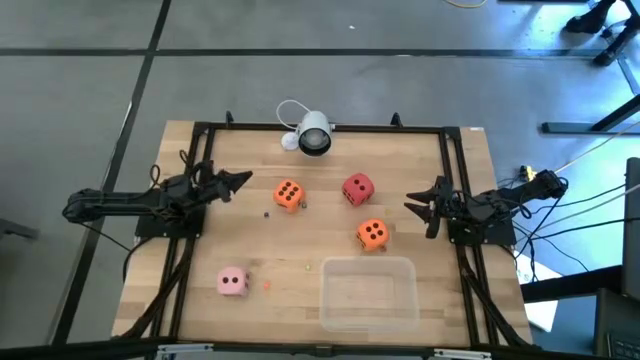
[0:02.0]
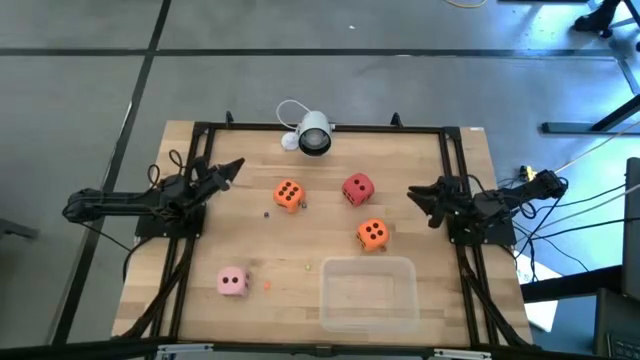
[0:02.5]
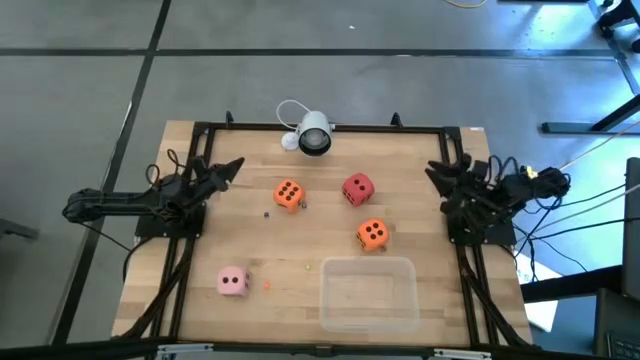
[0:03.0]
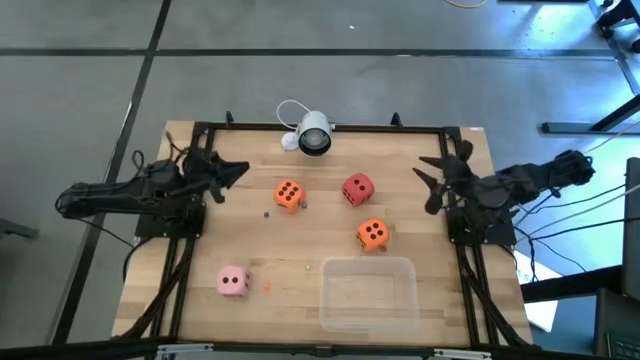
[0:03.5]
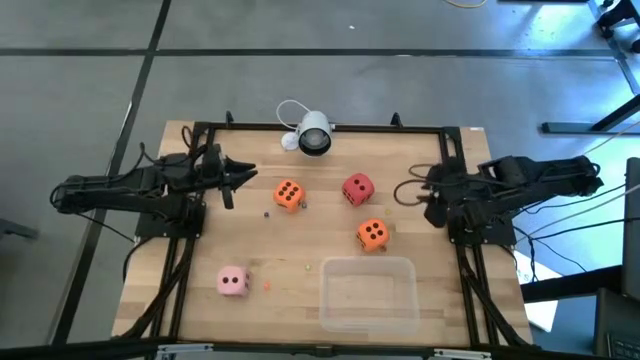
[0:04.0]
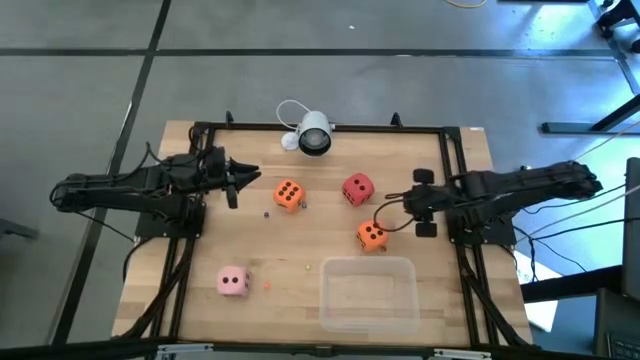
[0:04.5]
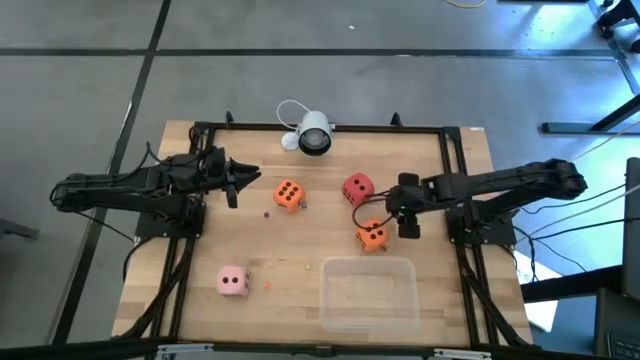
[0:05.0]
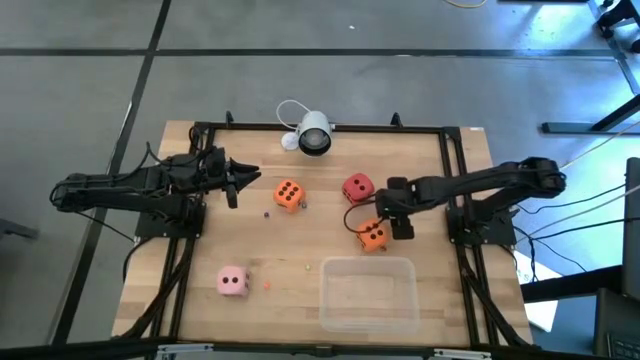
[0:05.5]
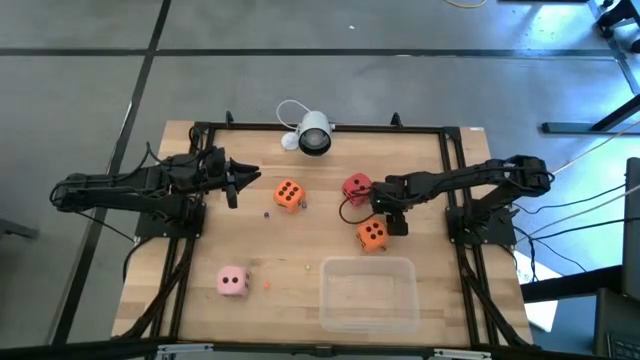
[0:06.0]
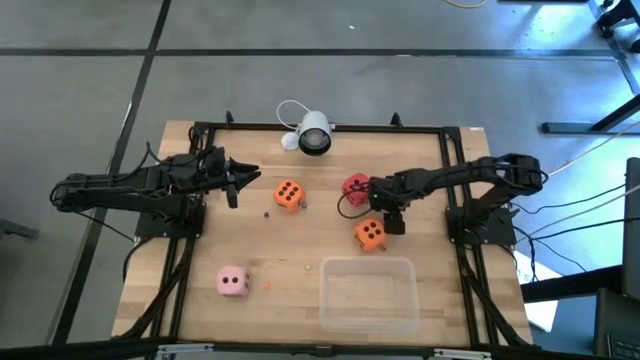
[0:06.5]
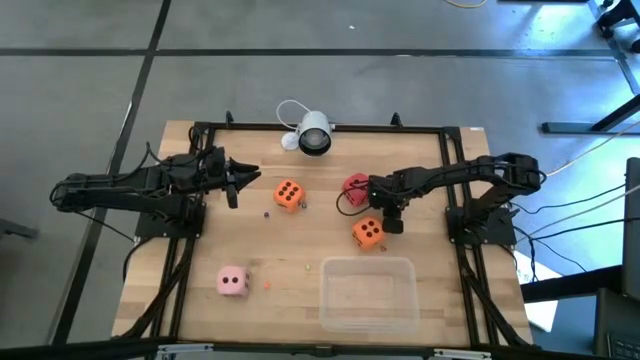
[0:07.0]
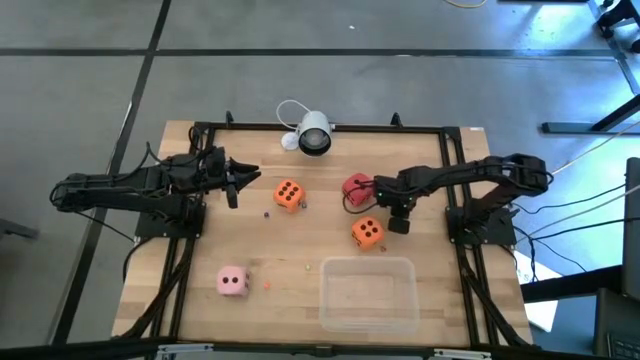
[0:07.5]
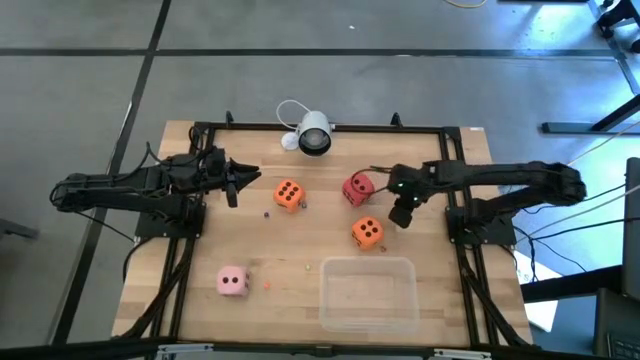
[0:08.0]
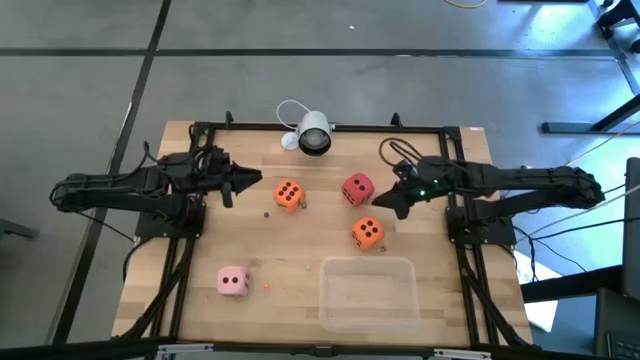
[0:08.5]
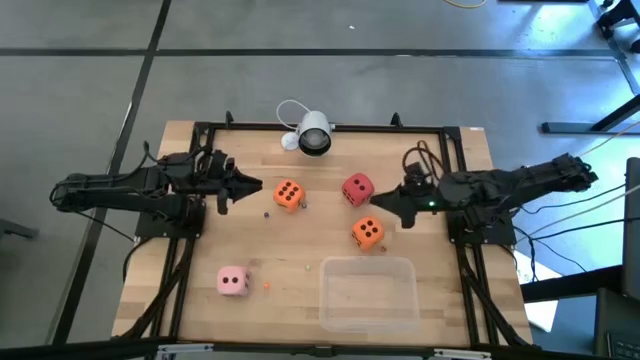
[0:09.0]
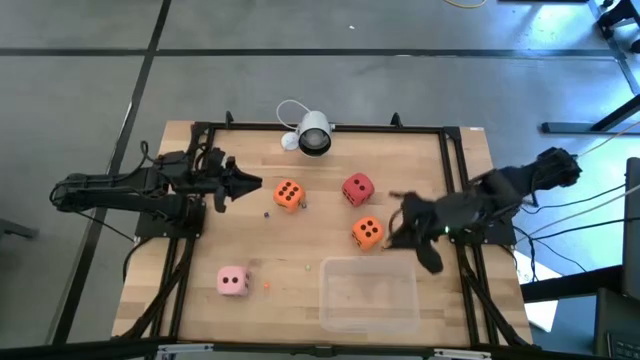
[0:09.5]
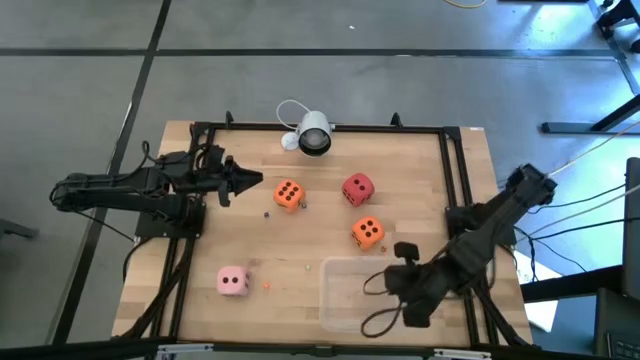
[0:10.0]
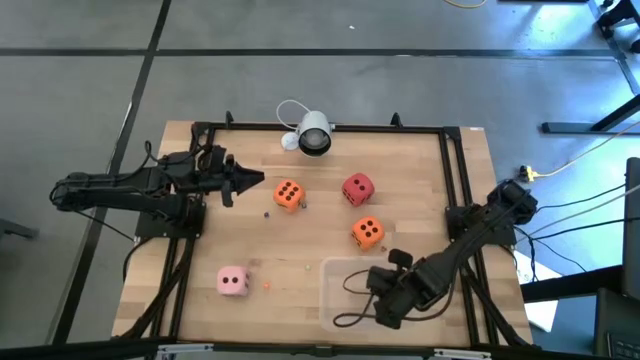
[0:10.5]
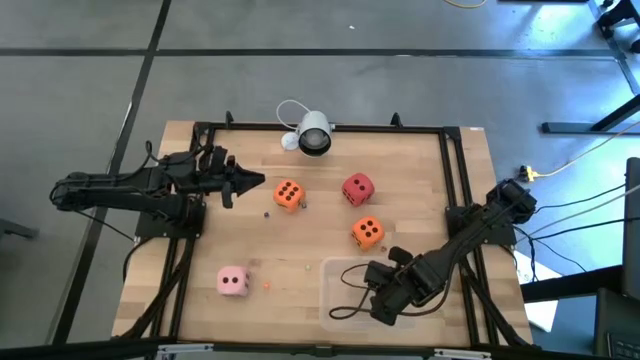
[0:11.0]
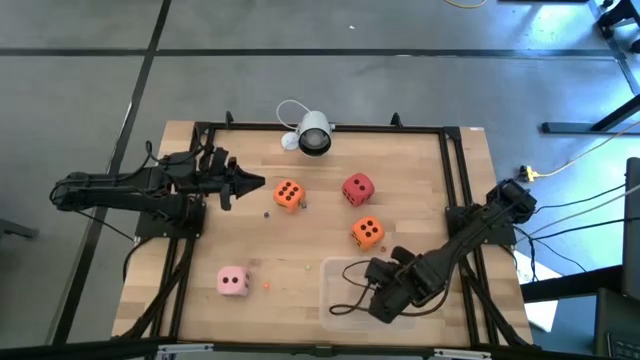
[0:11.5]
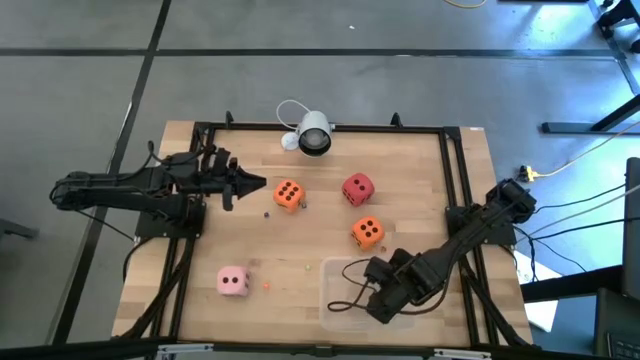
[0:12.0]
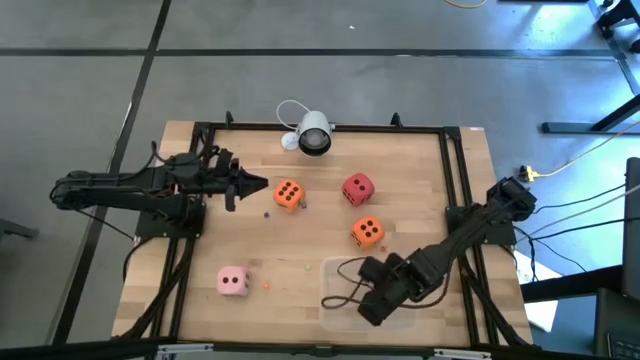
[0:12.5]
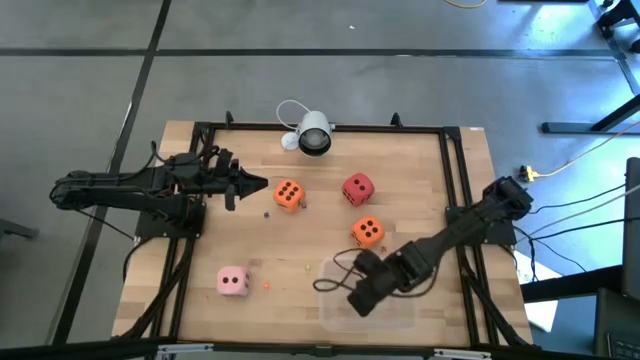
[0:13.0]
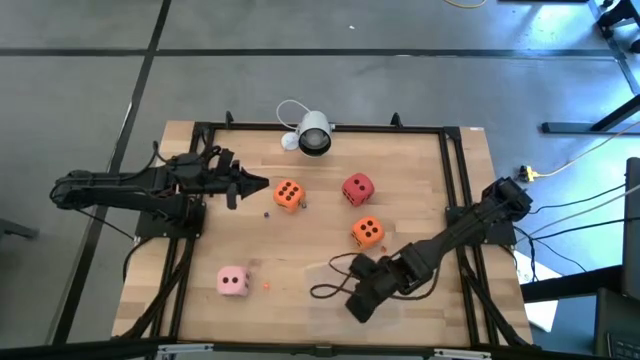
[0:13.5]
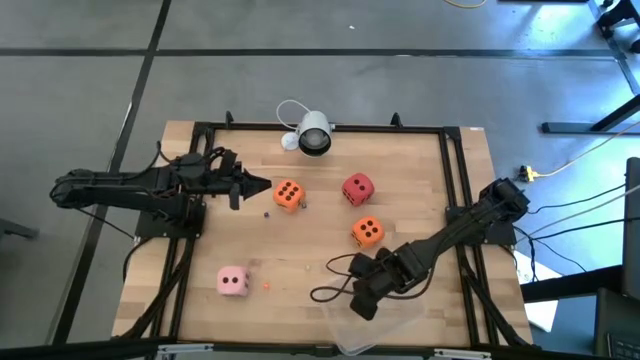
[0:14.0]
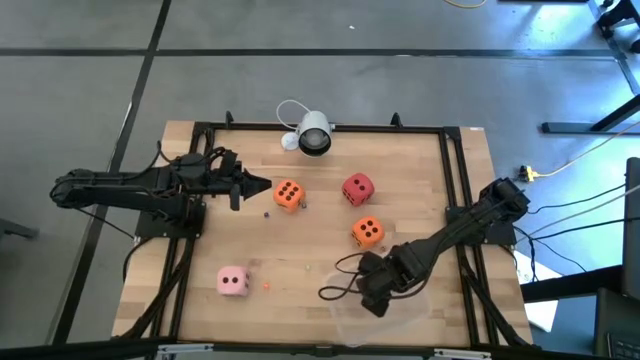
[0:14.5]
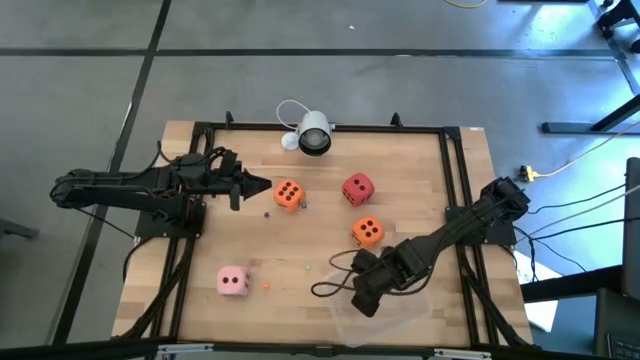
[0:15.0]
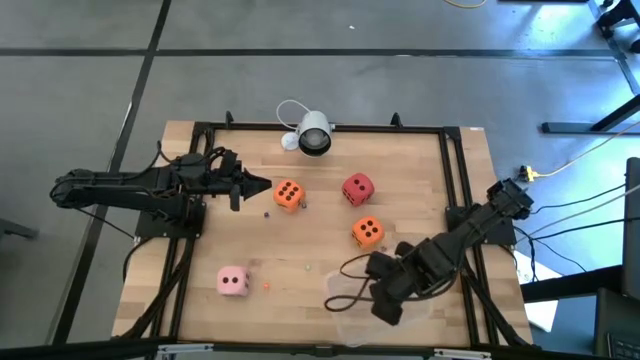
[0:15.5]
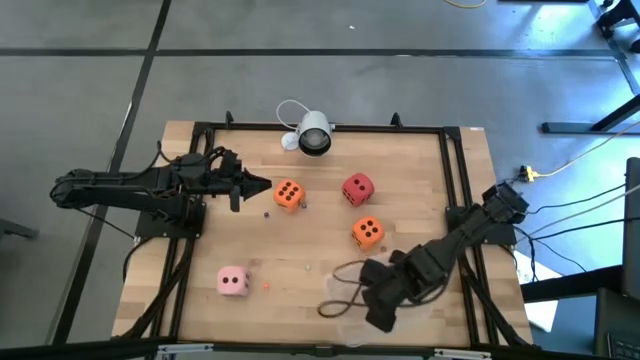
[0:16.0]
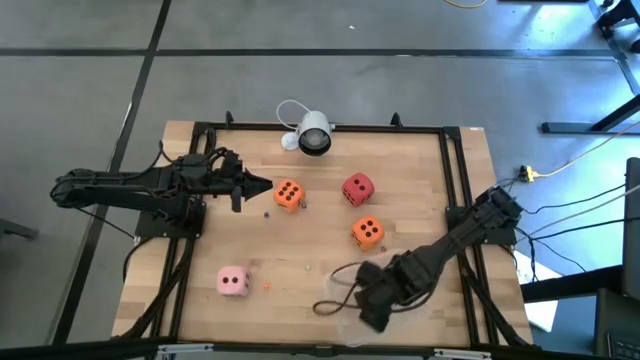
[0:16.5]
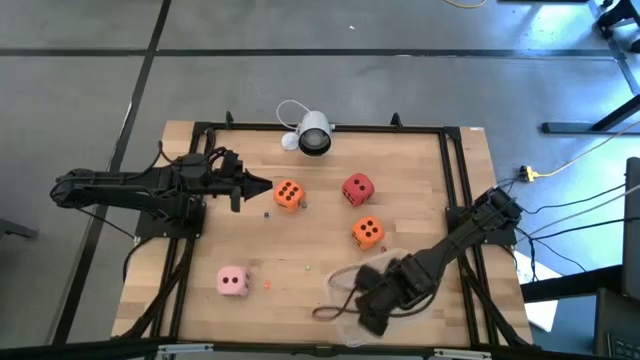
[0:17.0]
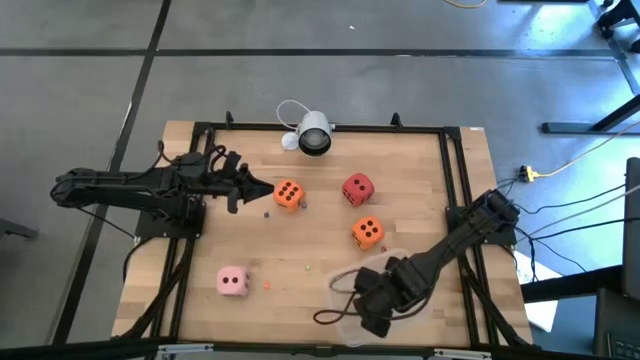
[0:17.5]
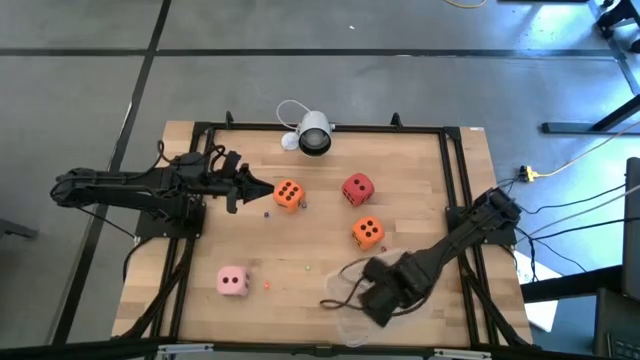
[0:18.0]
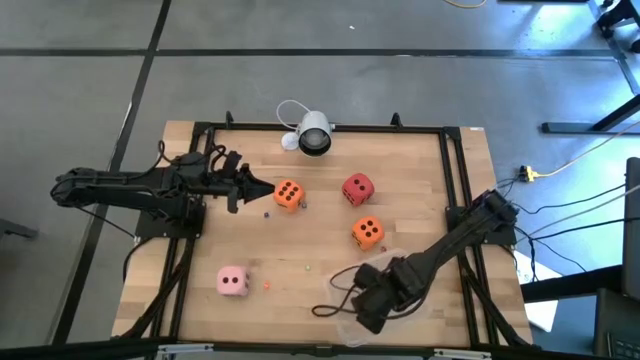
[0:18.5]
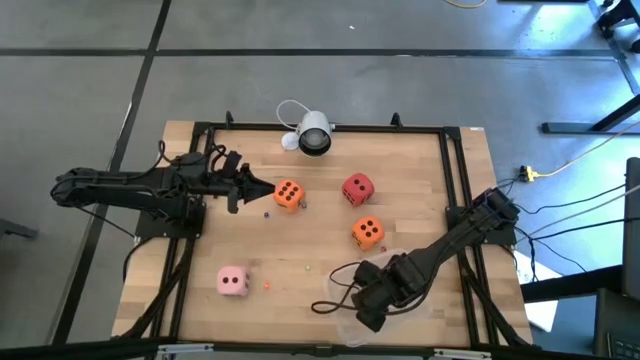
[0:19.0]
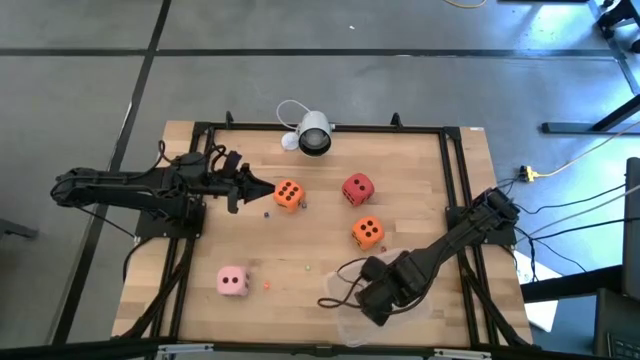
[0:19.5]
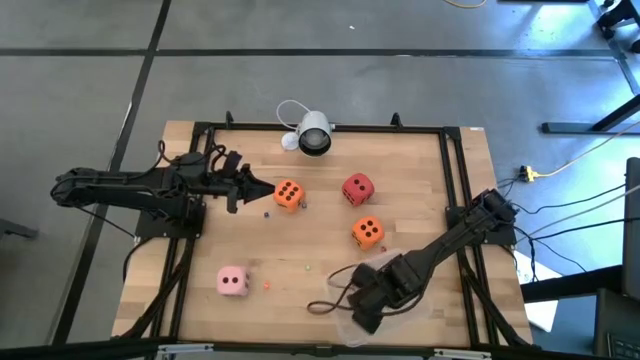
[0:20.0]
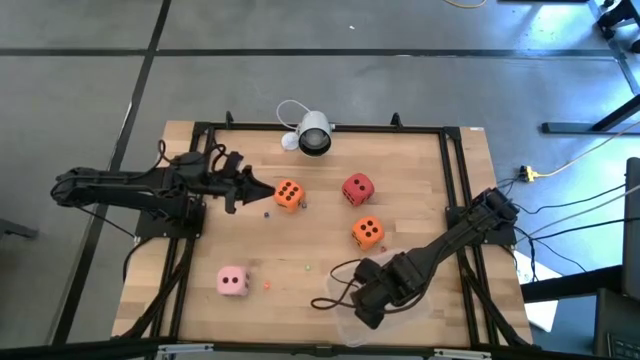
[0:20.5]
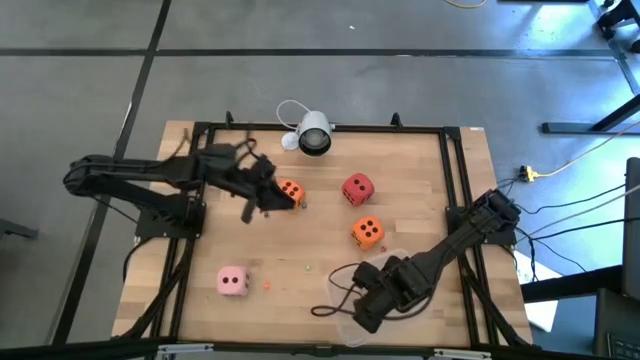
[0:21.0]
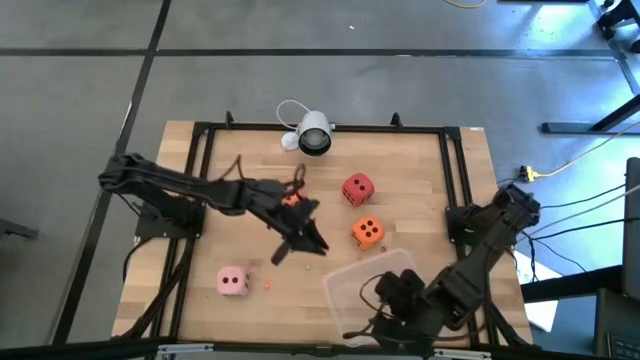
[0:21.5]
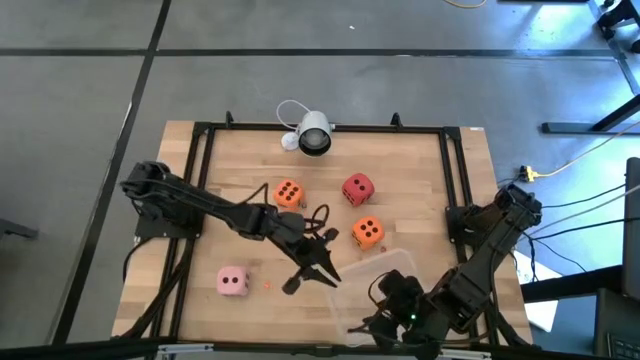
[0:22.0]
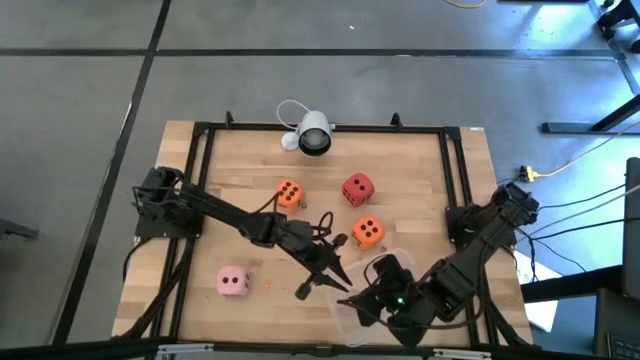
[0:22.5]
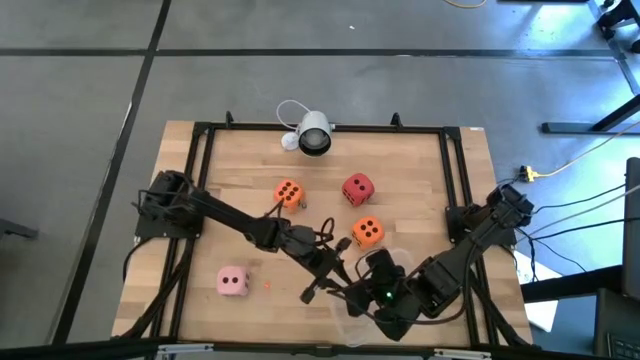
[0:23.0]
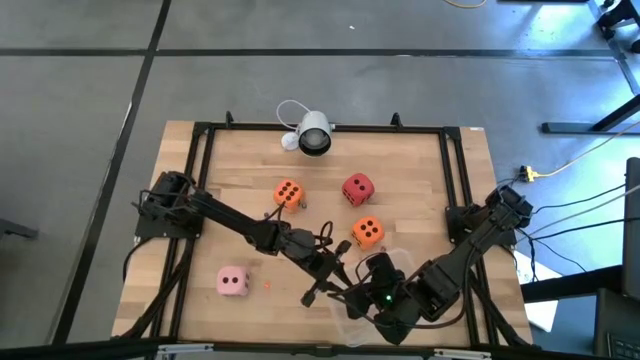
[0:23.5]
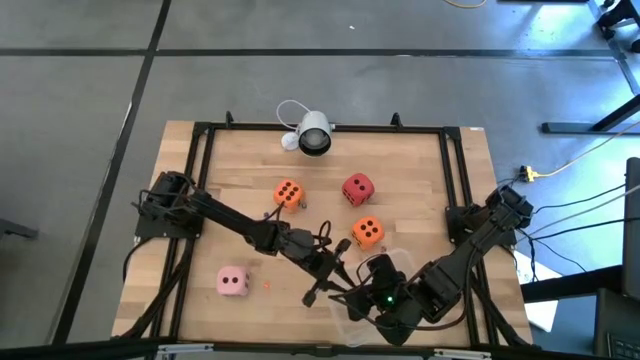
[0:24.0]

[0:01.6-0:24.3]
Task: Pick & Place Dice
Put the yellow small die into the transparent bin
